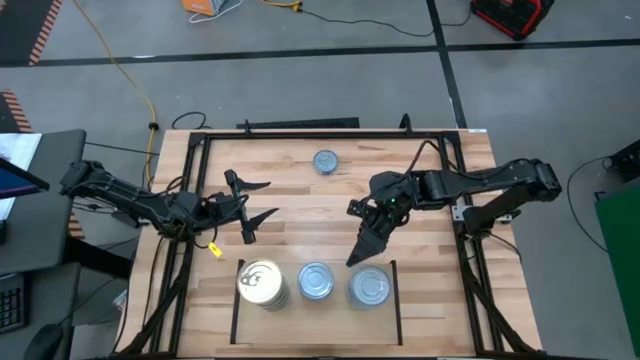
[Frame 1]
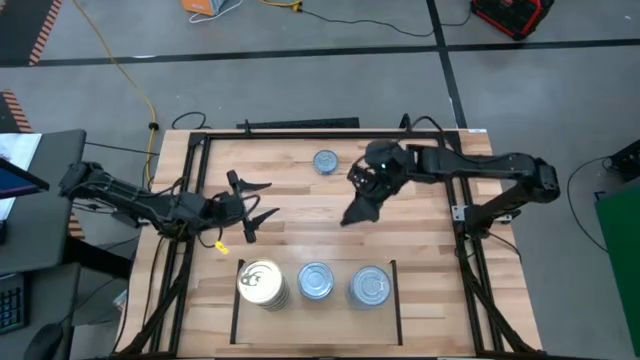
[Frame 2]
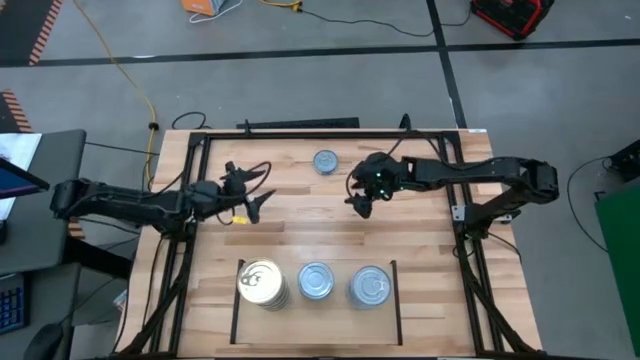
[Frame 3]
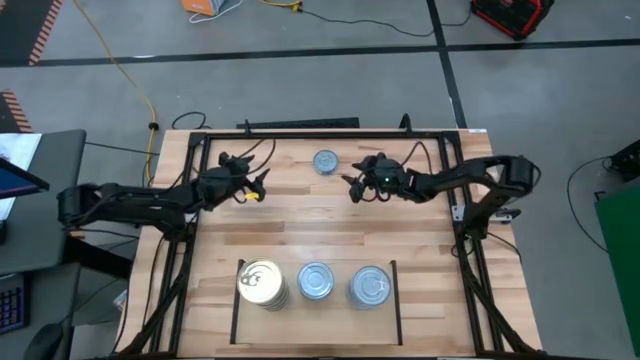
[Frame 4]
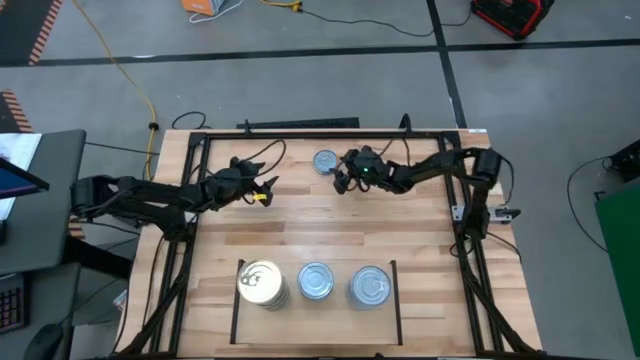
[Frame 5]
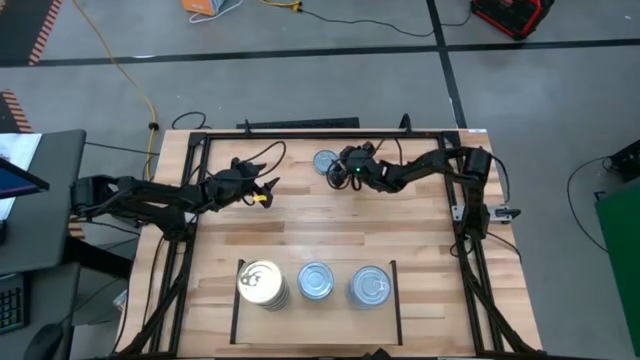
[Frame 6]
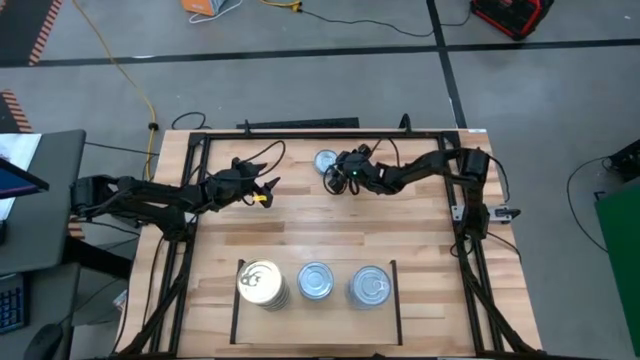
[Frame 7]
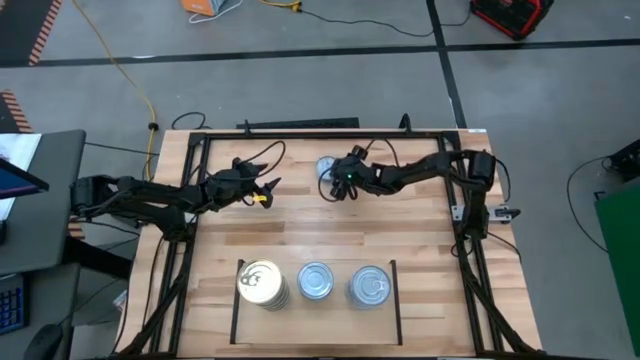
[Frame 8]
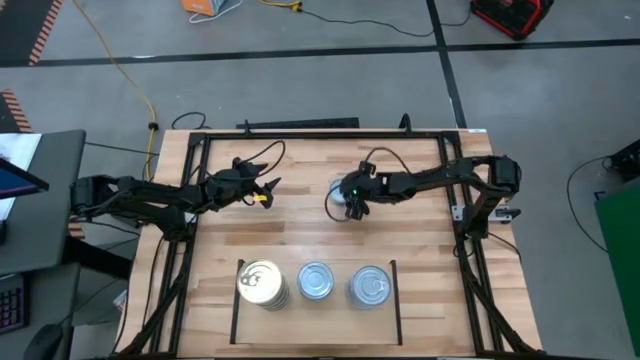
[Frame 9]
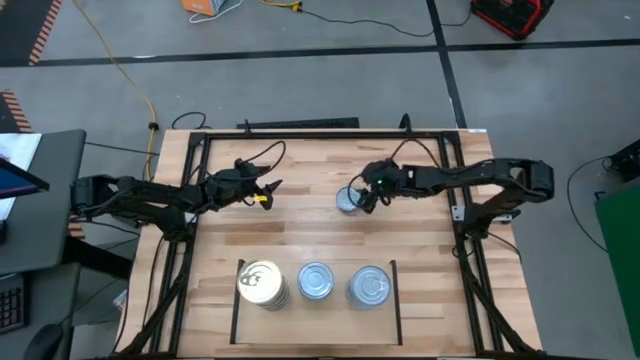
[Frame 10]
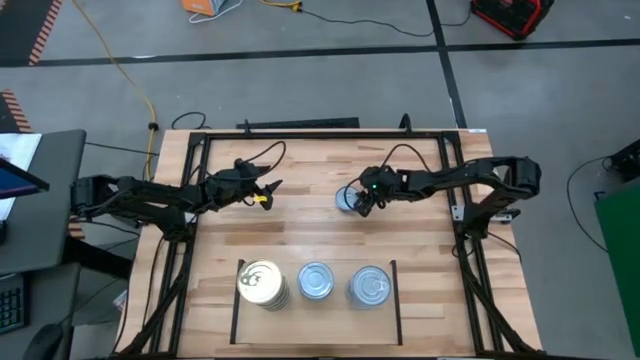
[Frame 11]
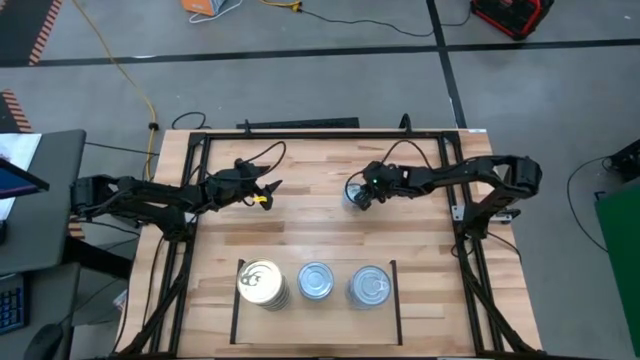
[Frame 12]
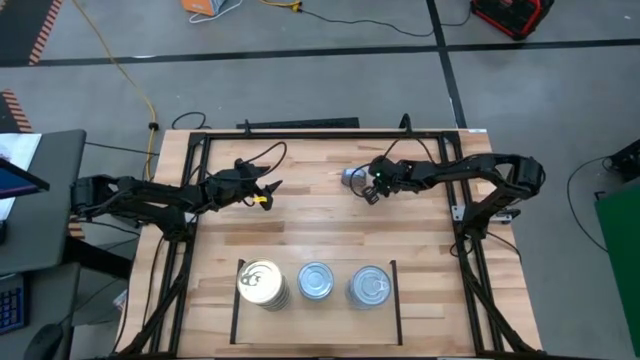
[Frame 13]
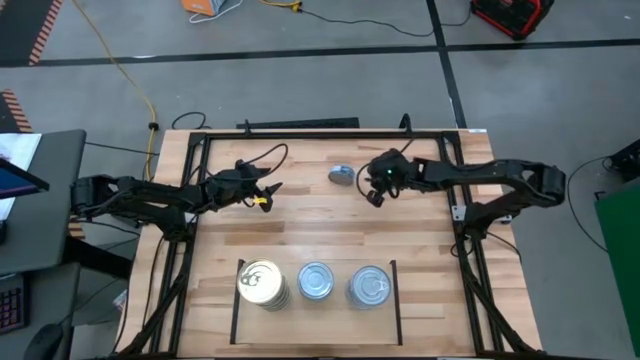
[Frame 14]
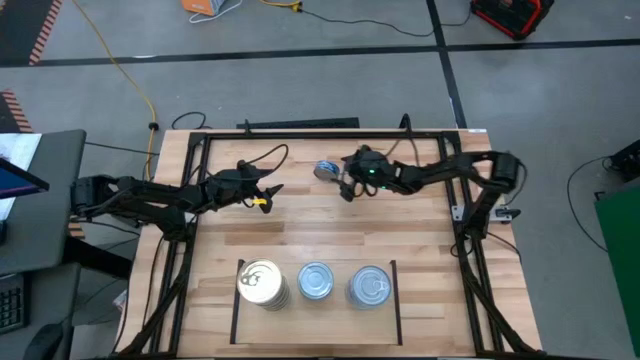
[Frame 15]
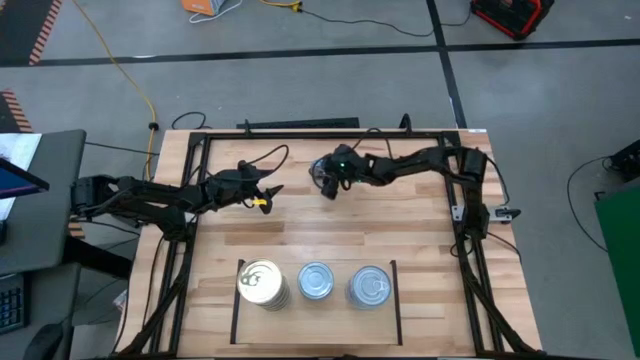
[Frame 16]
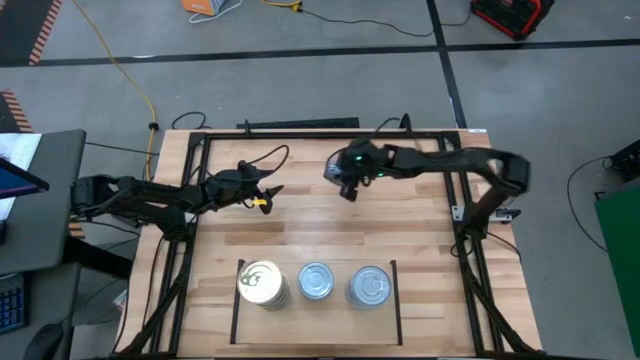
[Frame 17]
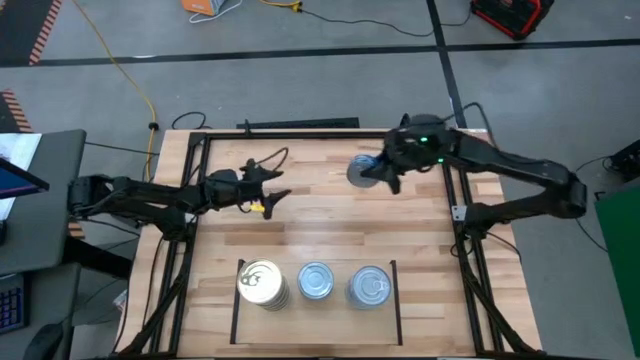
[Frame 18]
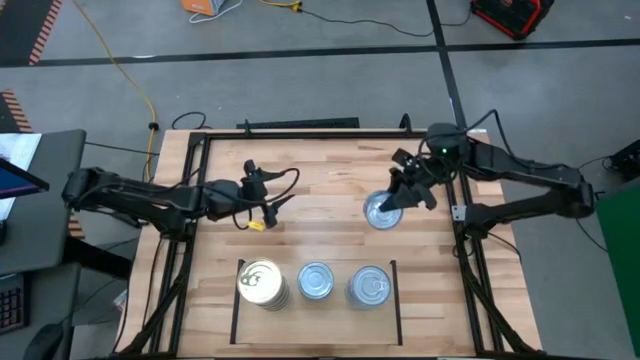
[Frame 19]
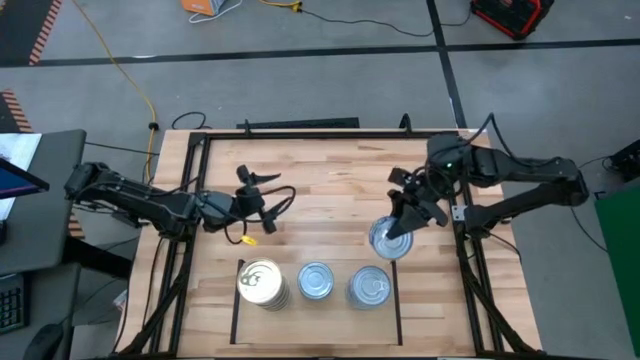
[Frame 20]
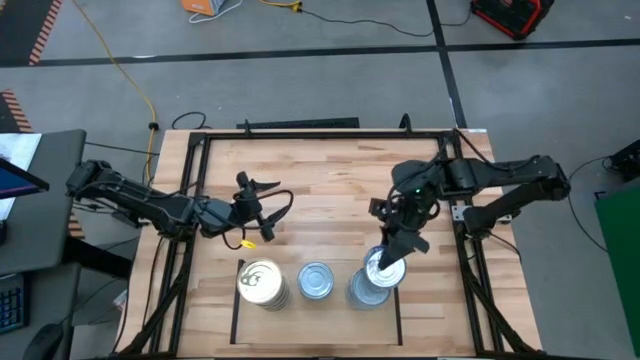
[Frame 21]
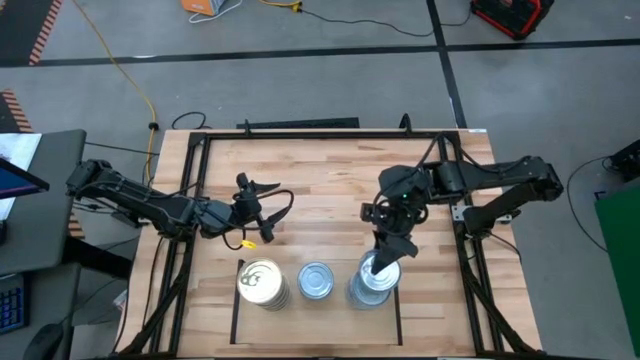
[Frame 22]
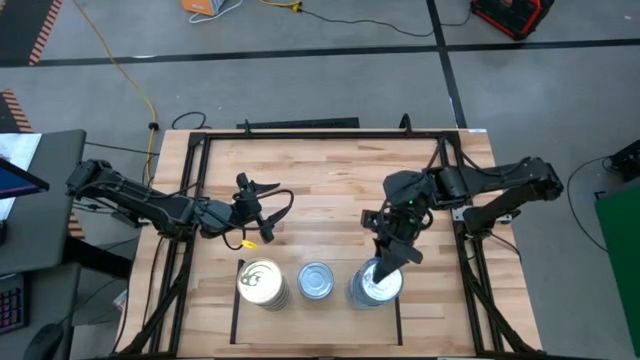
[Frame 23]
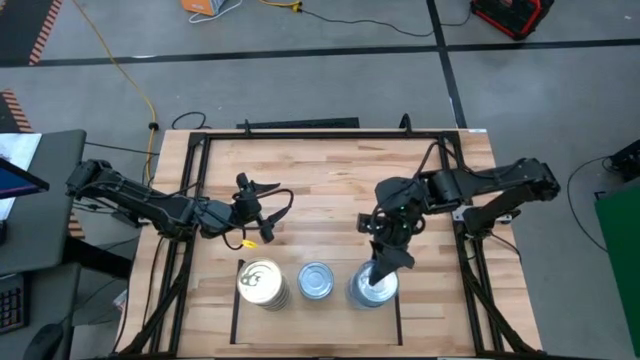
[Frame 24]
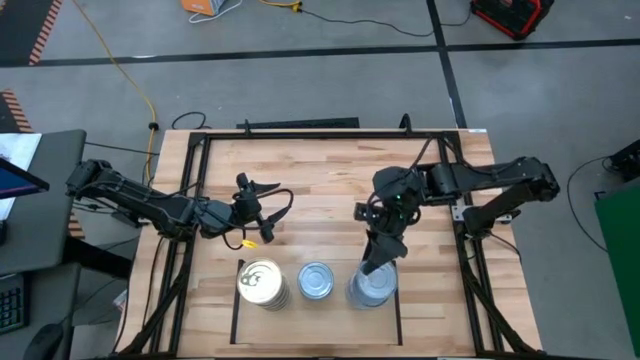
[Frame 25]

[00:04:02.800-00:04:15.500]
Task: Stack canned seafood by type on shelf
Put the blue tuna can on the top of the left stacked tuna cans on the shelf

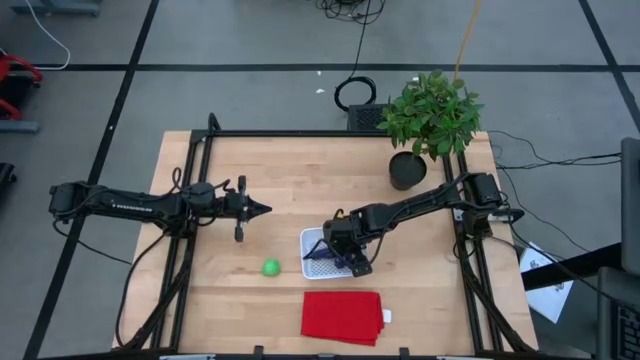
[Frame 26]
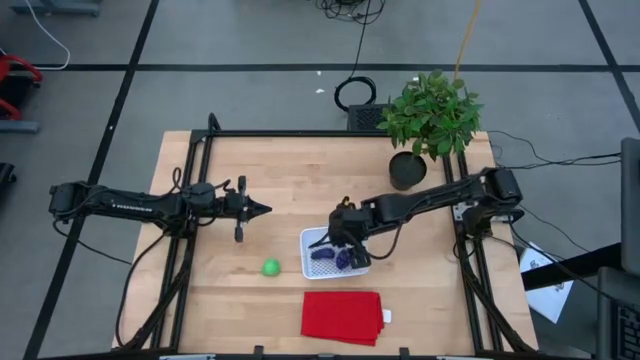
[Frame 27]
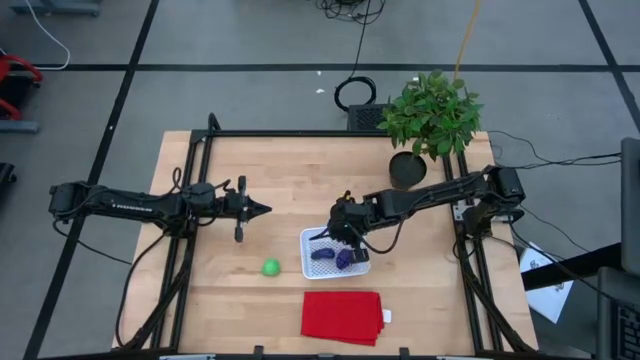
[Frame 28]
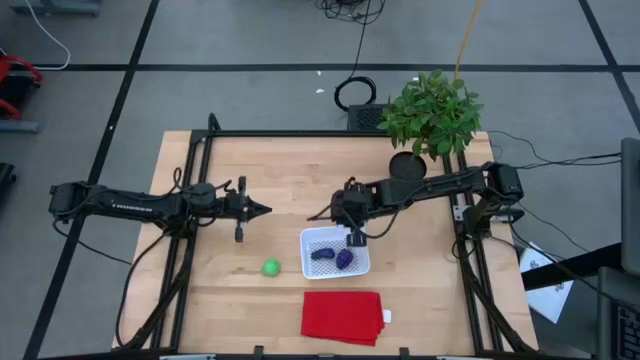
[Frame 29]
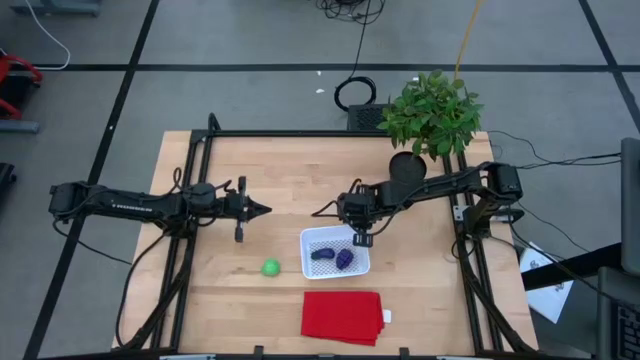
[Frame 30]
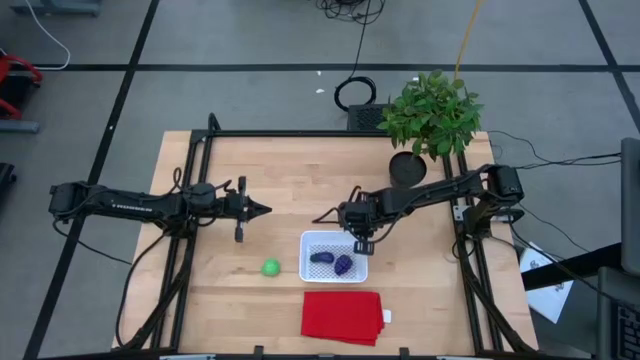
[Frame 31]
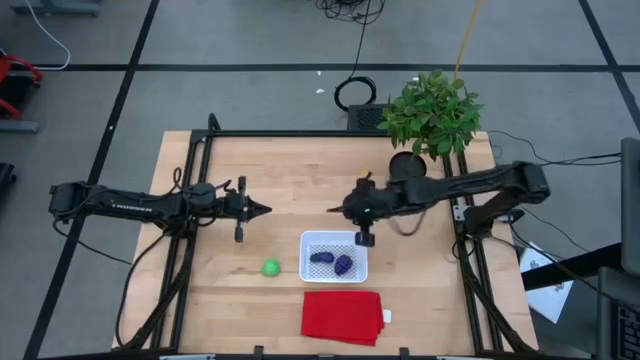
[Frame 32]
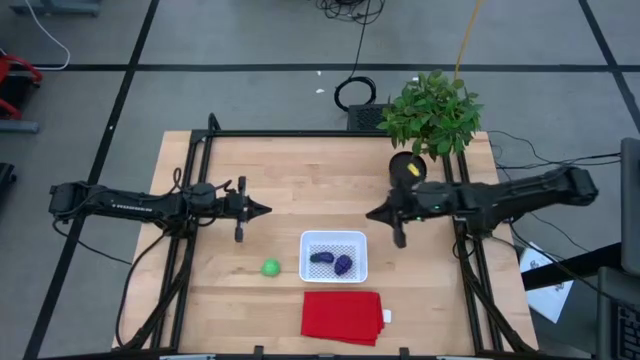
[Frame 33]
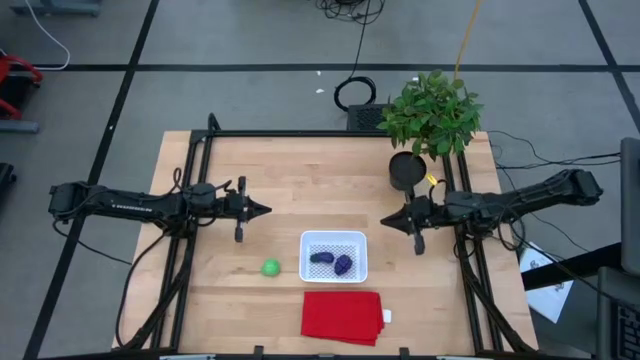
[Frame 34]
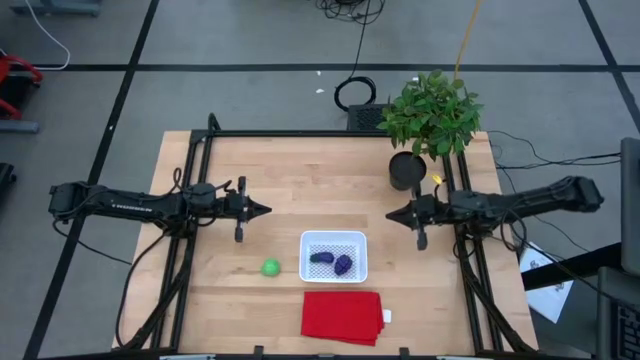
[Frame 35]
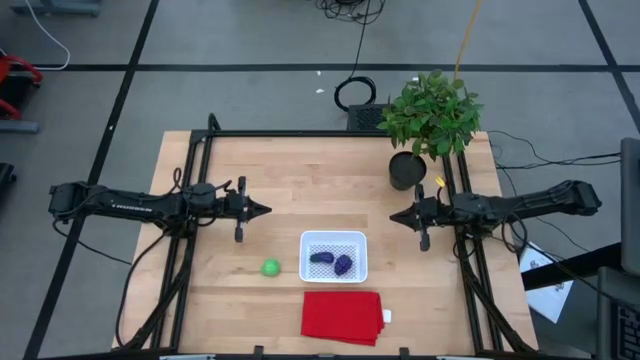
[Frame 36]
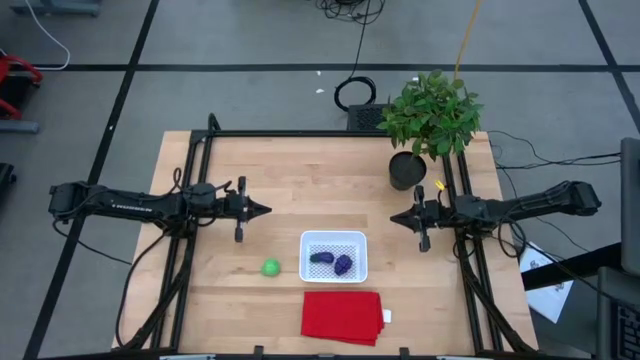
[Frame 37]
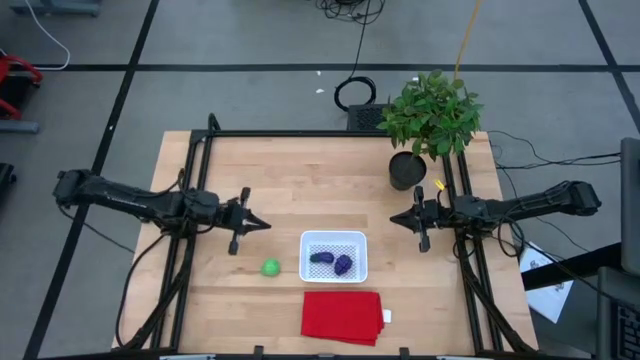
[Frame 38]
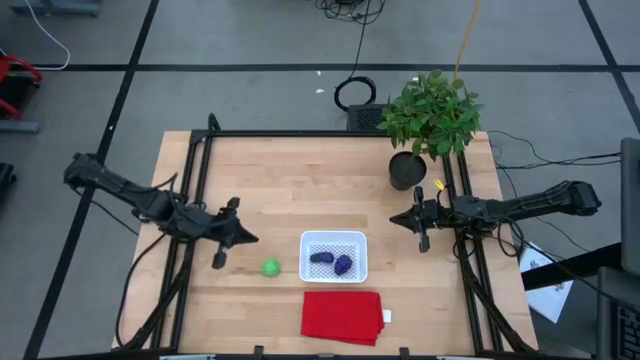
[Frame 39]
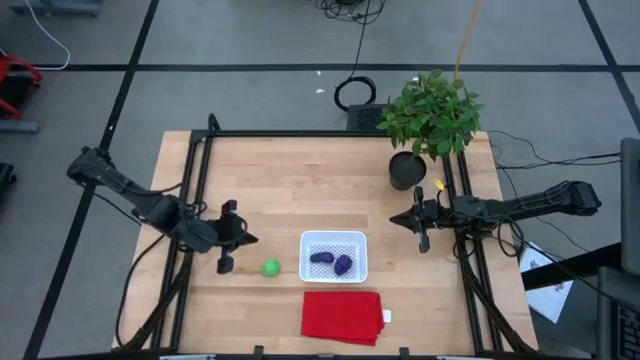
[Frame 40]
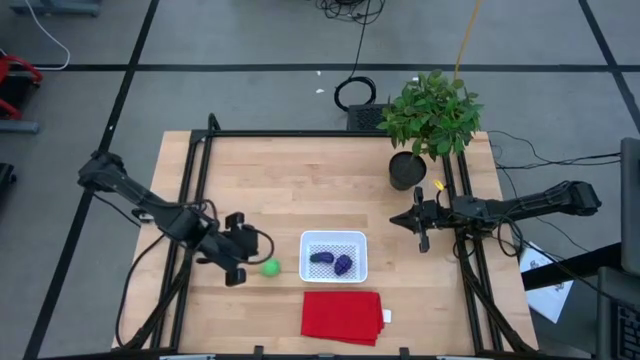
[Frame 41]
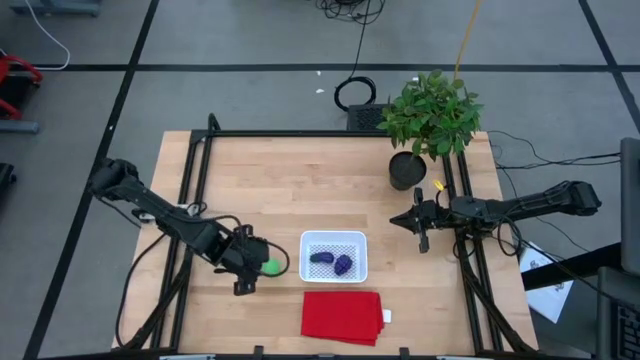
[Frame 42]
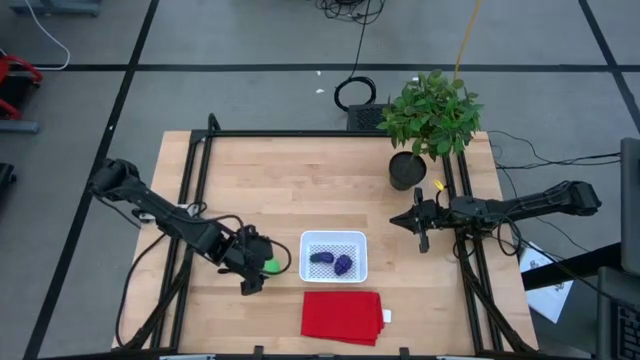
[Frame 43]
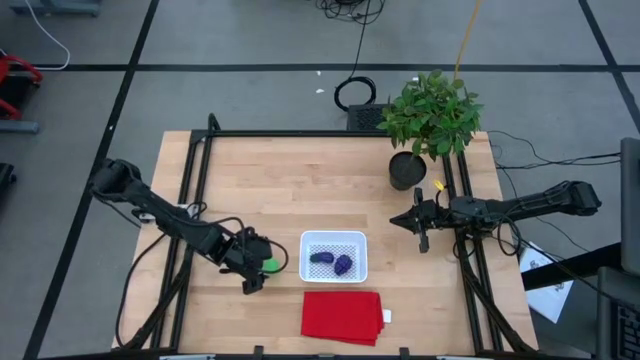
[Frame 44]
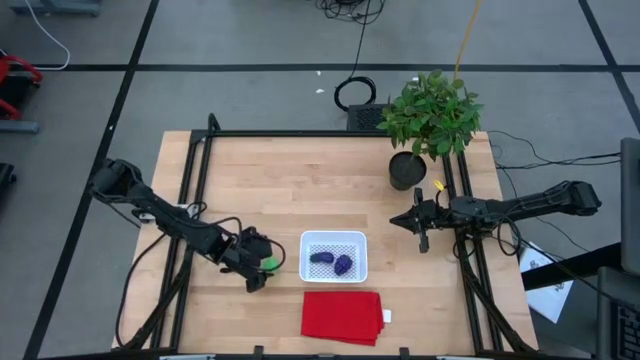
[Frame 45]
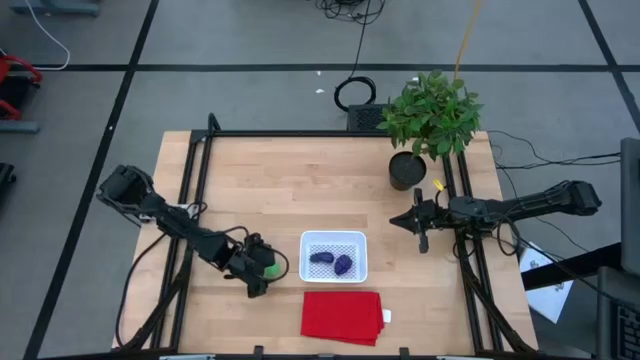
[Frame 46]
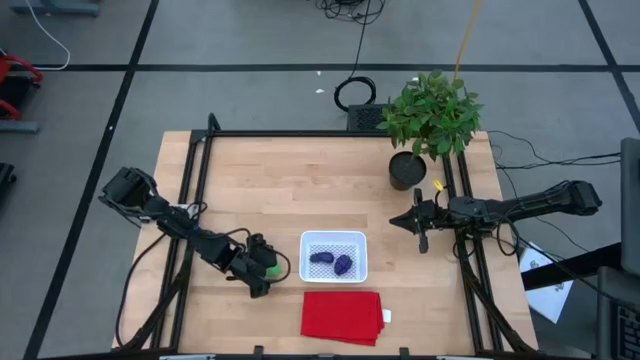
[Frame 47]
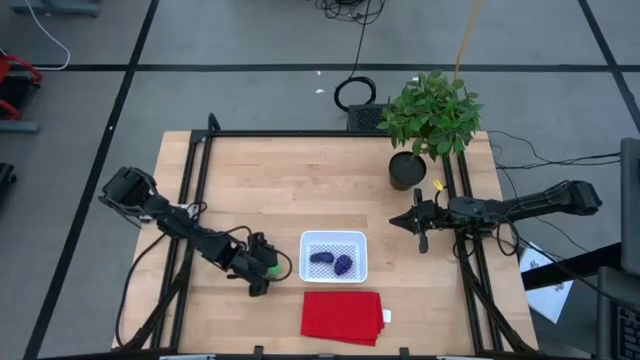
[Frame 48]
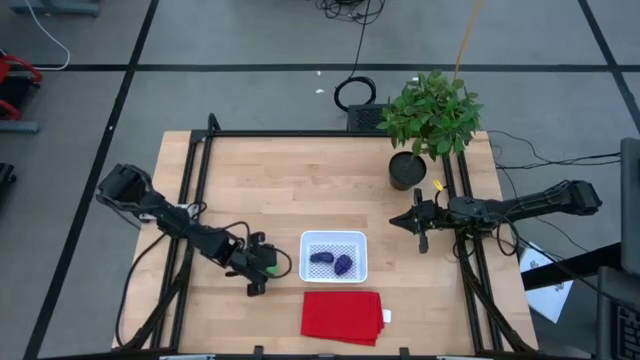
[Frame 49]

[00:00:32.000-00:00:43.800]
Task: Pick and placing Produce into tupperware
Put the pear into the white basket
